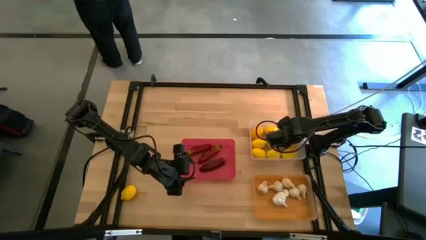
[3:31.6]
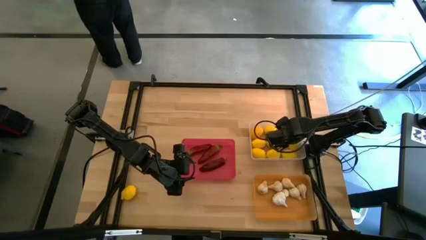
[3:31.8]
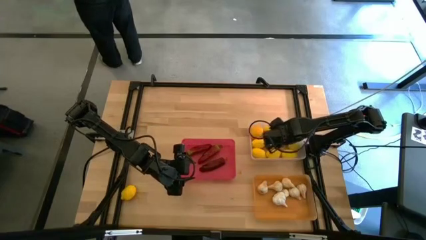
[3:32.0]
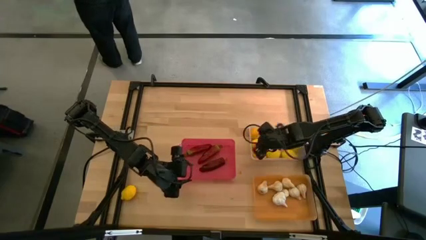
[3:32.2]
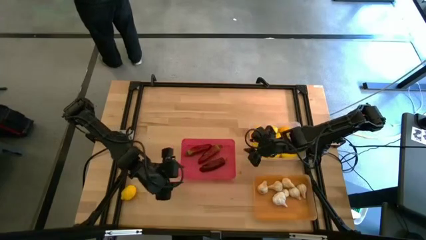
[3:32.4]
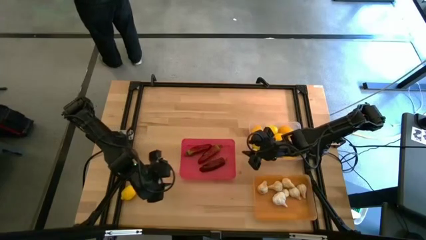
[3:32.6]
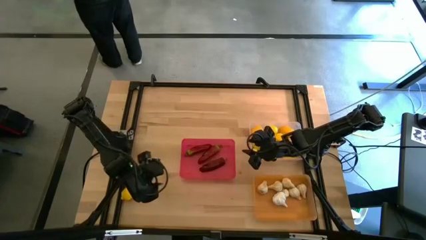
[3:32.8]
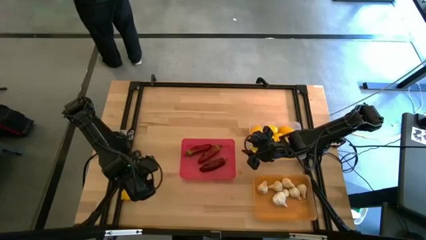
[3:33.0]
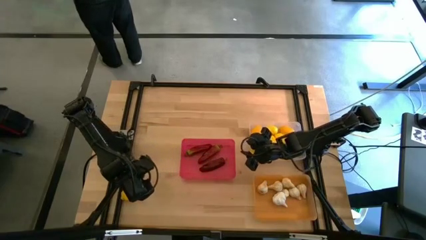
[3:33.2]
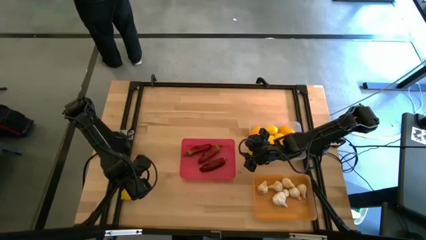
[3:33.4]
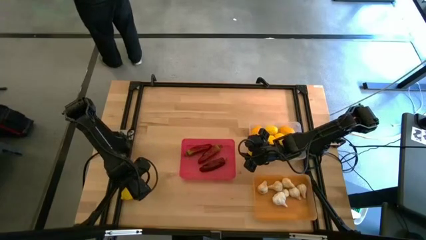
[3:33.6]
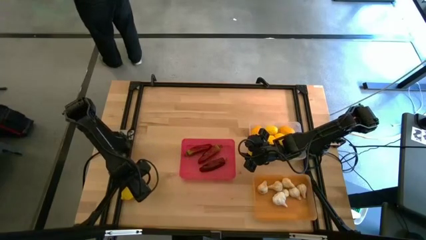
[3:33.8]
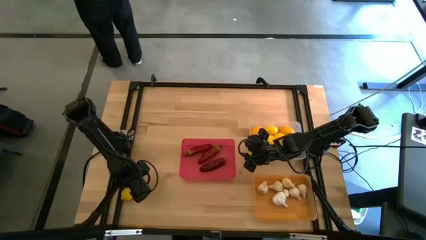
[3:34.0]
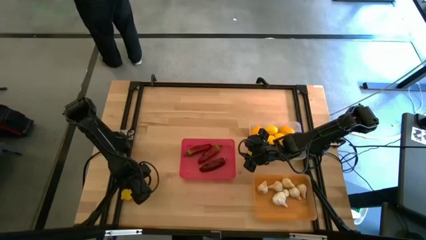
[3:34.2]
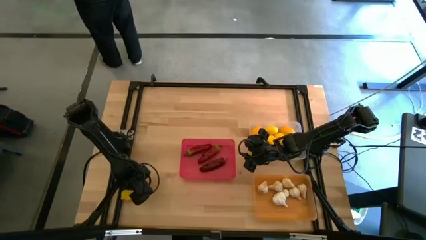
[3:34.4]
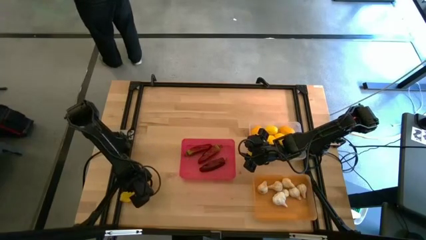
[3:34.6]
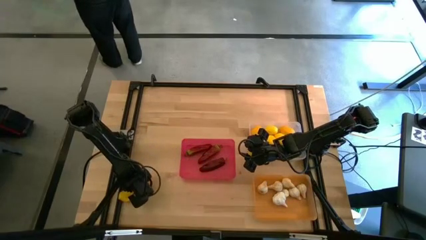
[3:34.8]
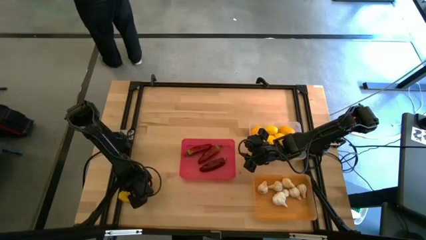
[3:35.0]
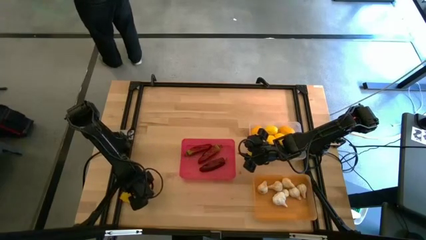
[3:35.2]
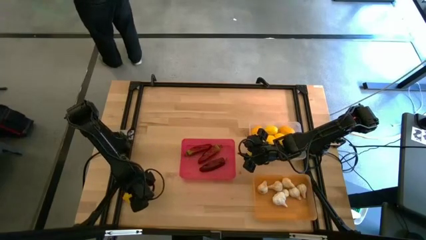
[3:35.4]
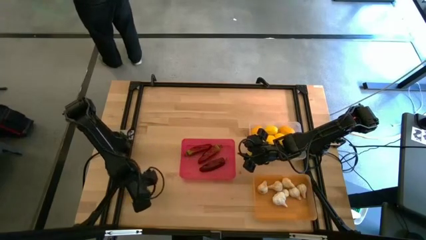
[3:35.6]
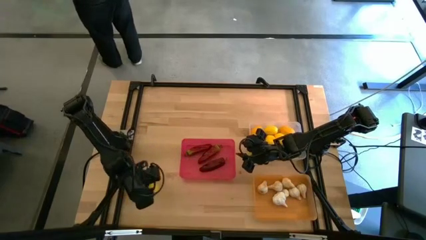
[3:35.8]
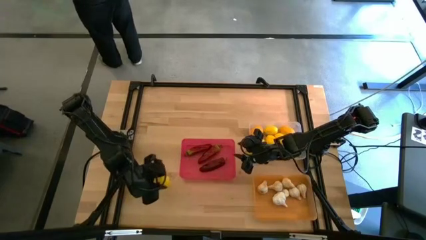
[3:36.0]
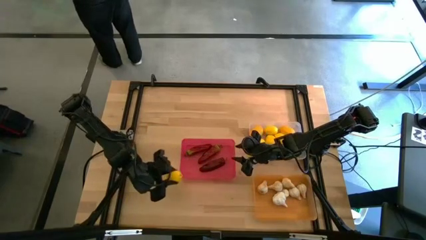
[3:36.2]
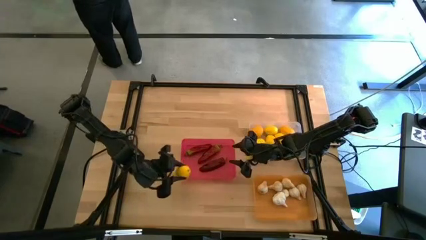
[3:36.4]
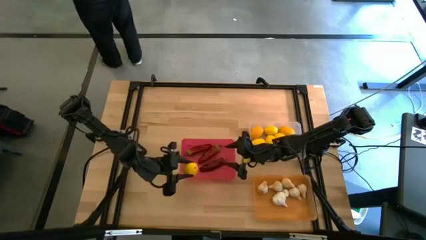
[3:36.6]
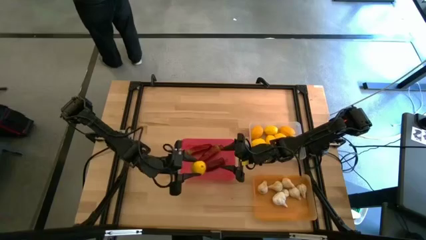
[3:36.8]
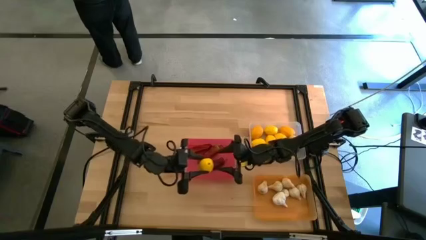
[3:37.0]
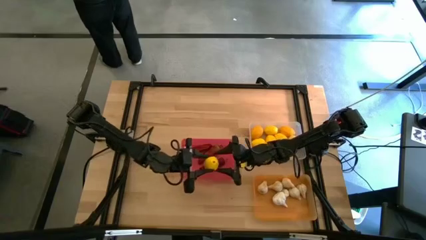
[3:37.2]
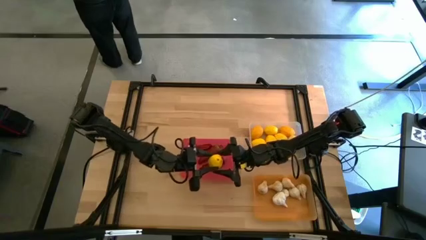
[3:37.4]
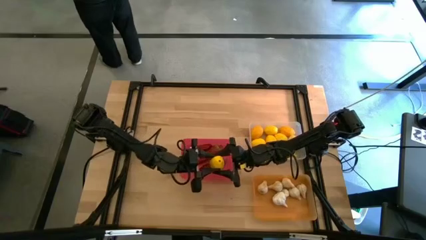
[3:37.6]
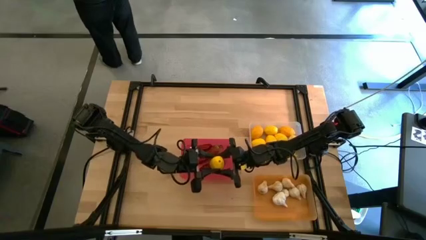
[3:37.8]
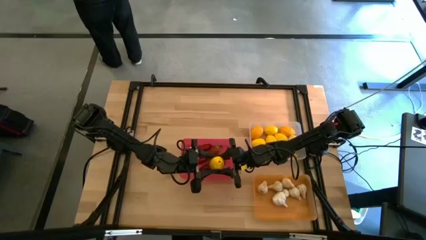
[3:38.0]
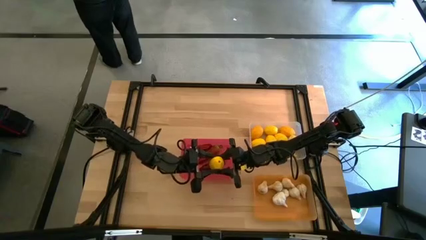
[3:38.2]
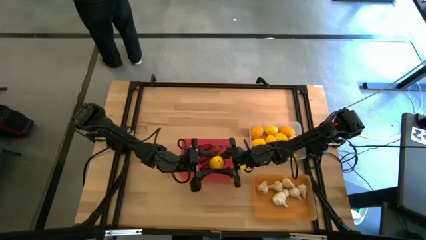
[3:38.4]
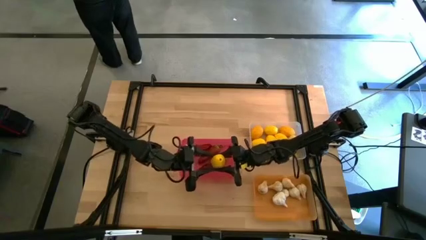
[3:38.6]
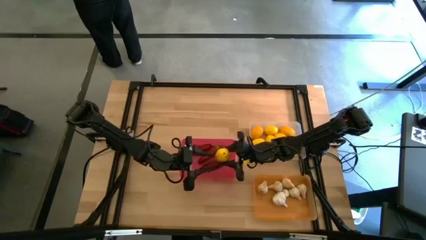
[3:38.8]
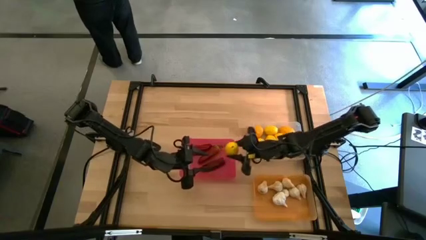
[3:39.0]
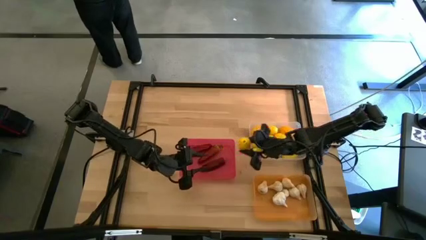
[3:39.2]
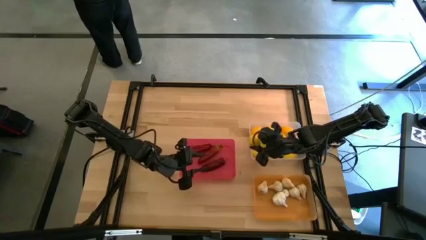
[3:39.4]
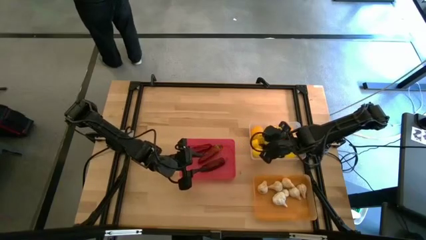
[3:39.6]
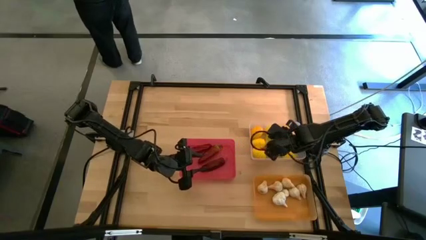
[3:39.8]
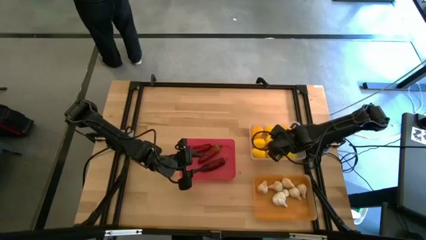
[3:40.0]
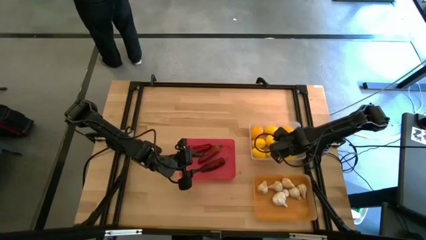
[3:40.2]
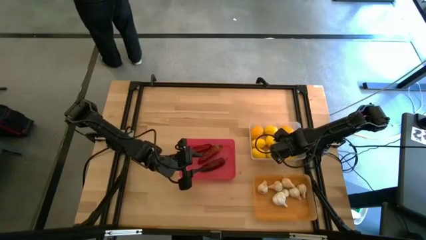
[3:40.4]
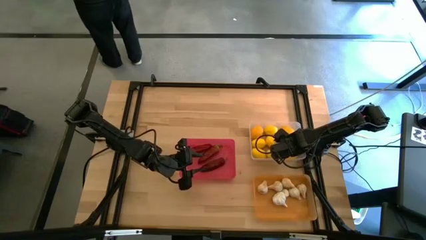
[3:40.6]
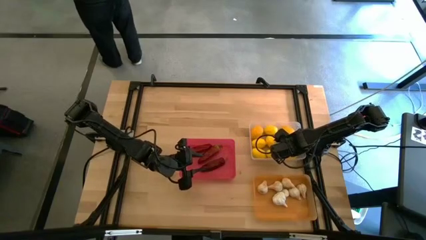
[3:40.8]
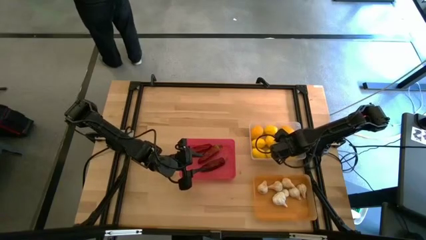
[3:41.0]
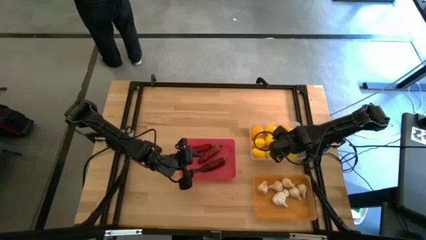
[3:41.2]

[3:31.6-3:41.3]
Task: Sort produce into baskets
Put the yellow lemon into the transparent bin

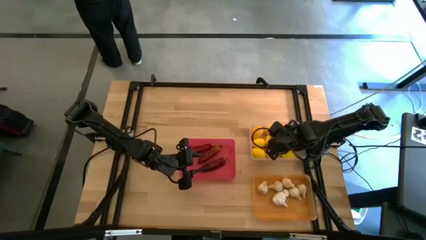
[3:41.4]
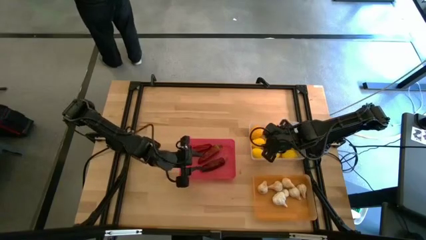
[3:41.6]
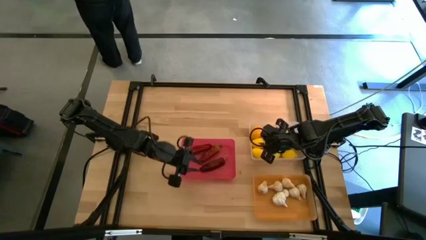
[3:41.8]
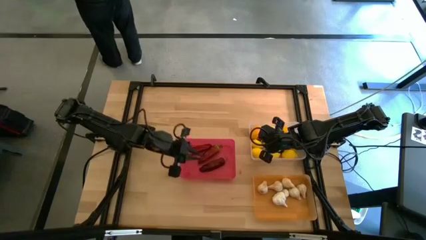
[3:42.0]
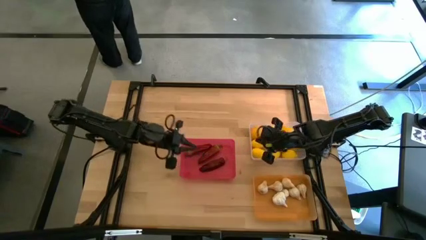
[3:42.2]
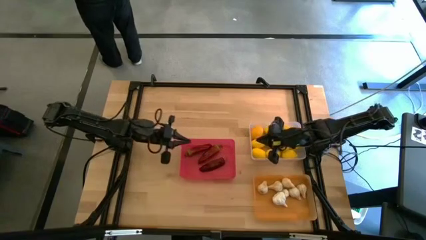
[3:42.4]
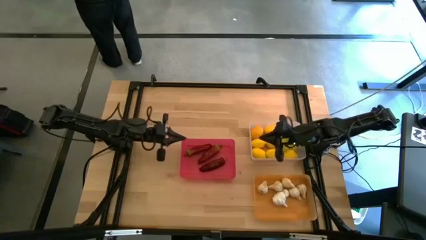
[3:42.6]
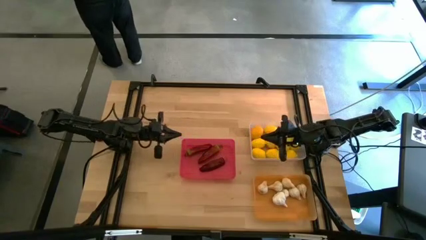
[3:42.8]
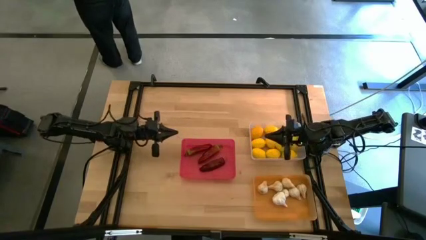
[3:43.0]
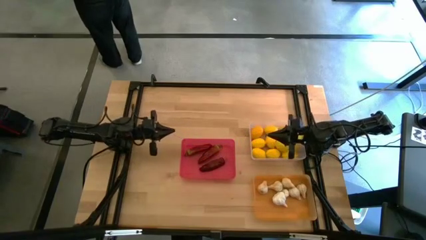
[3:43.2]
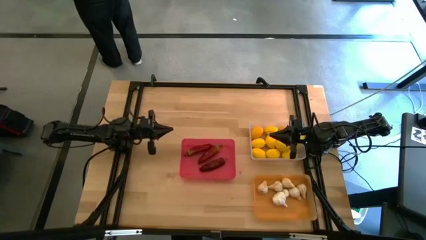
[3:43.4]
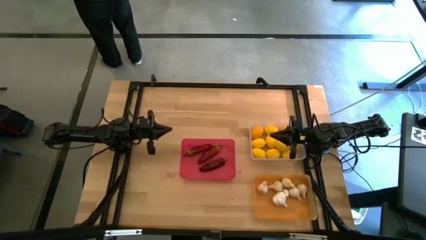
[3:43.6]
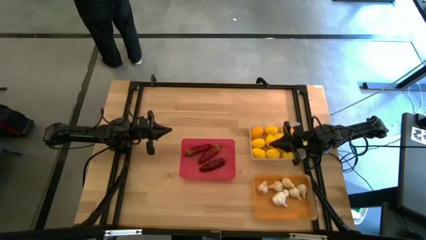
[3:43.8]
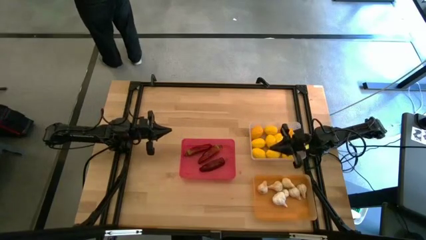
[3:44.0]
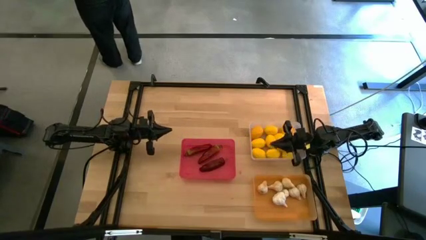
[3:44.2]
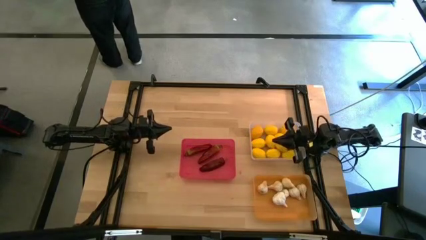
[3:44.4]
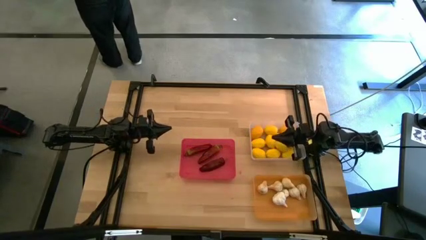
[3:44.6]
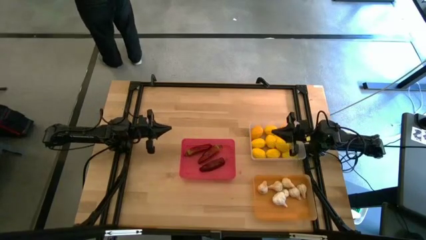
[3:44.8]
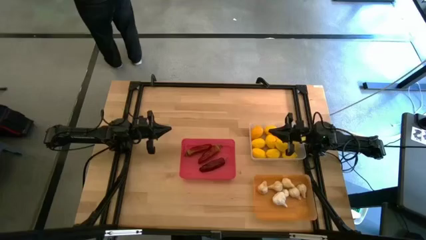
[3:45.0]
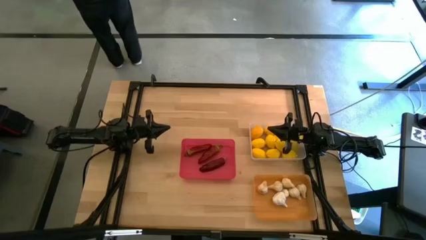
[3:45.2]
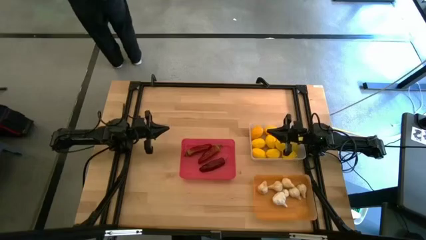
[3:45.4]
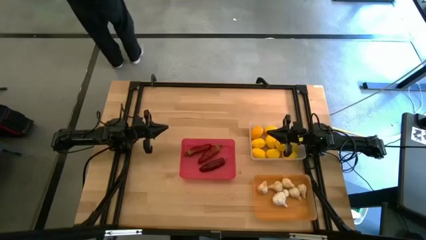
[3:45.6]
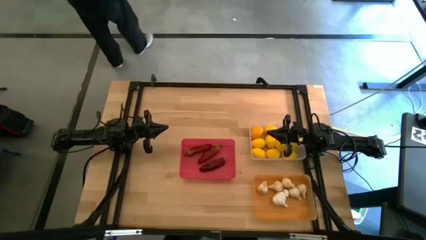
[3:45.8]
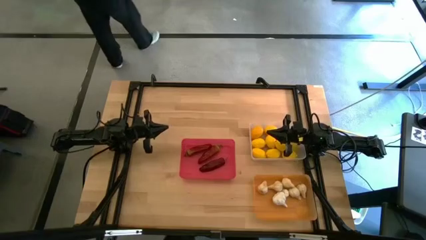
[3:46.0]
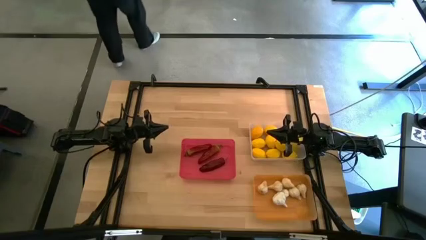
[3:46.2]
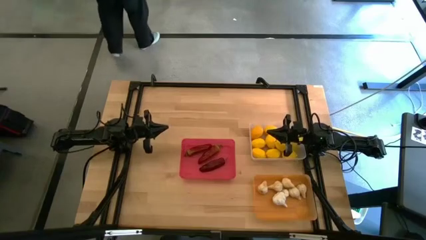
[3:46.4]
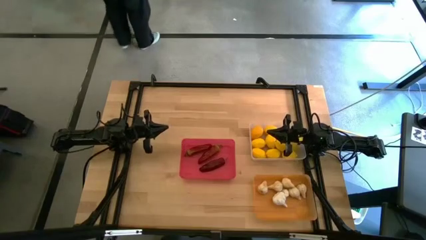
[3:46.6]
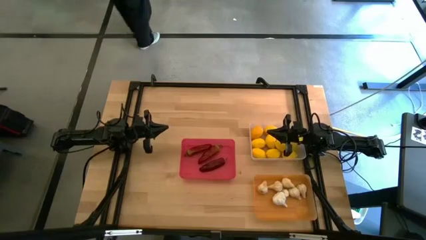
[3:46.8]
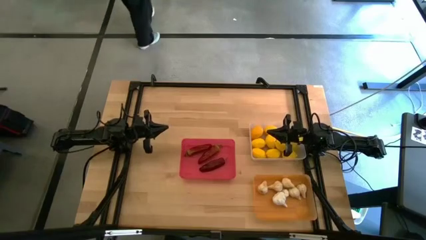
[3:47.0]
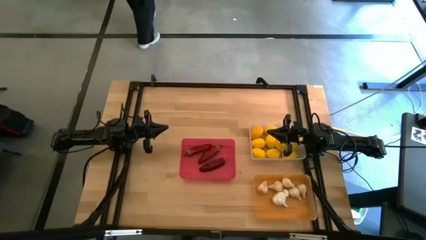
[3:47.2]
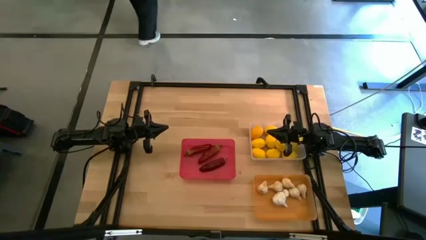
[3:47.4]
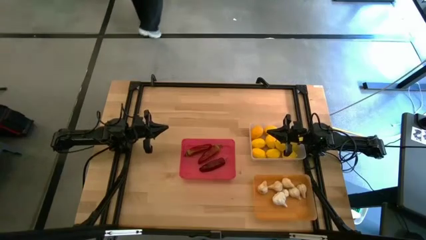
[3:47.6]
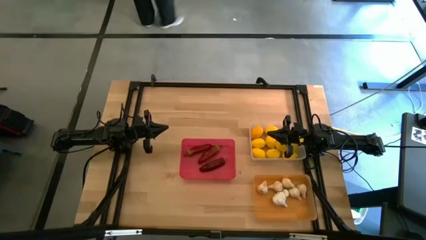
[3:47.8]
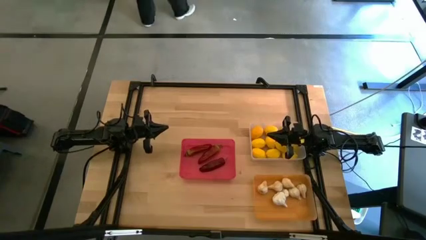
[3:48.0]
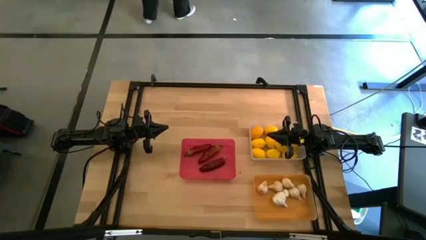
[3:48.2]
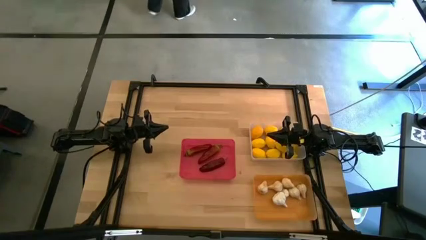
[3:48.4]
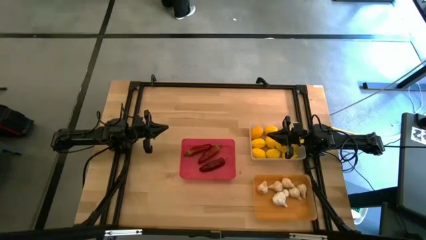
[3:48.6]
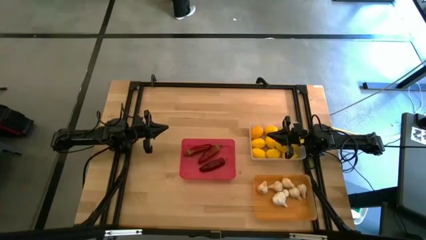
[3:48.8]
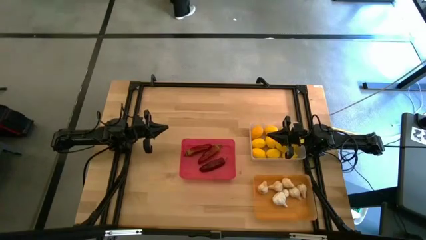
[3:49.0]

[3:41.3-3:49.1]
Return to Home Position
